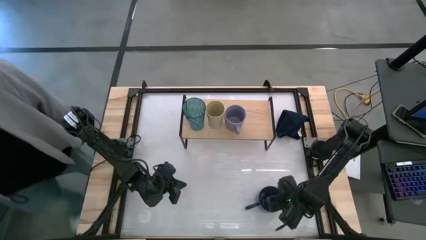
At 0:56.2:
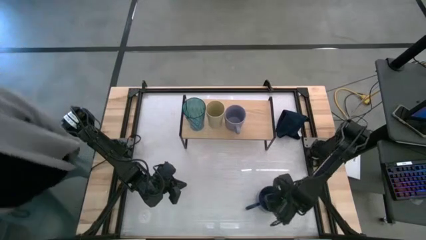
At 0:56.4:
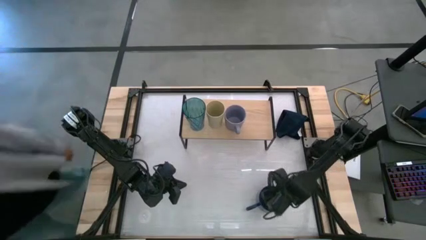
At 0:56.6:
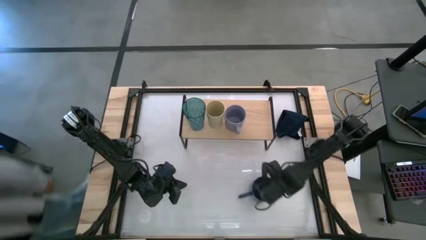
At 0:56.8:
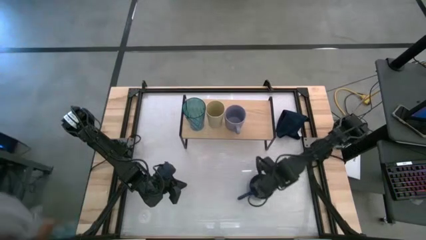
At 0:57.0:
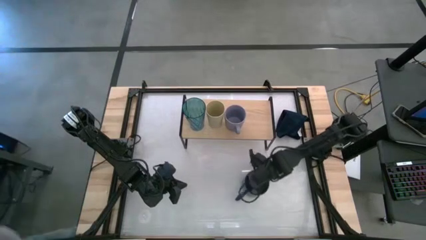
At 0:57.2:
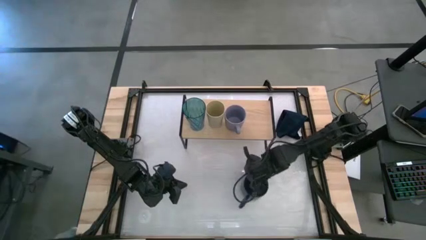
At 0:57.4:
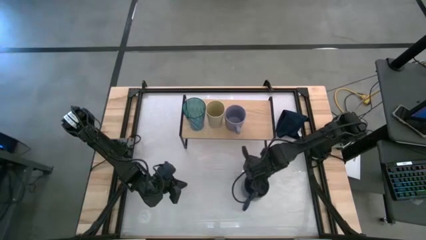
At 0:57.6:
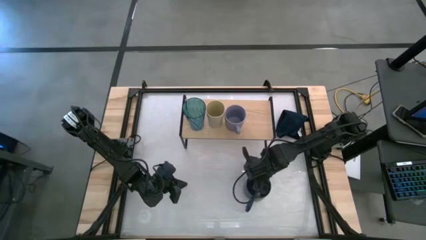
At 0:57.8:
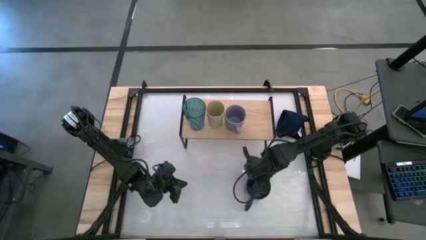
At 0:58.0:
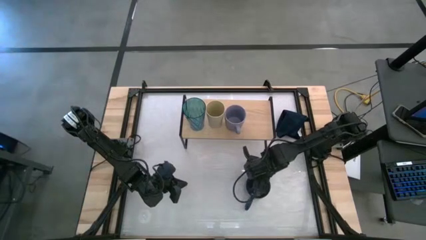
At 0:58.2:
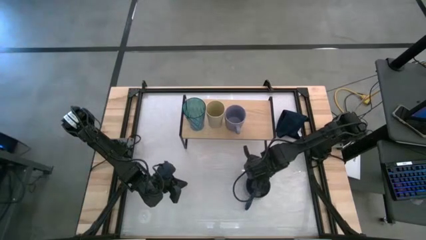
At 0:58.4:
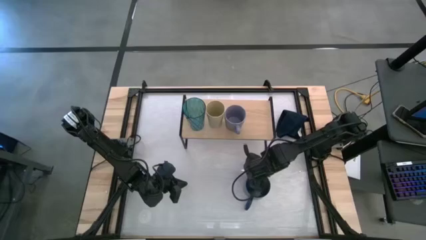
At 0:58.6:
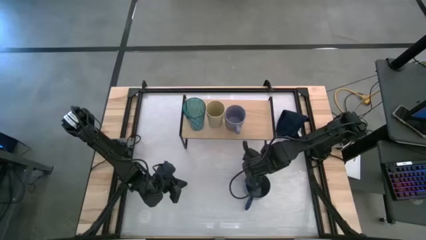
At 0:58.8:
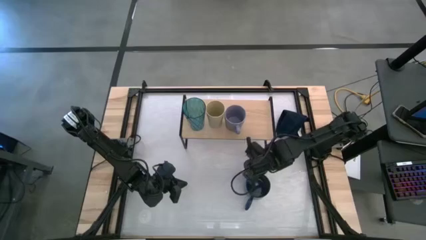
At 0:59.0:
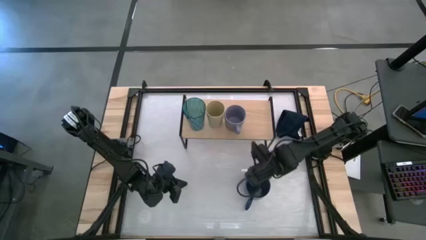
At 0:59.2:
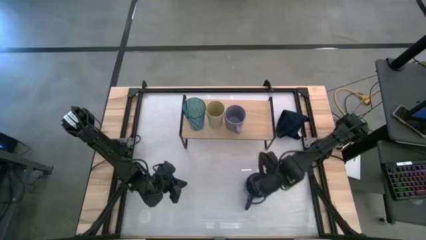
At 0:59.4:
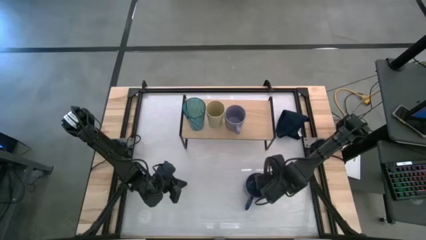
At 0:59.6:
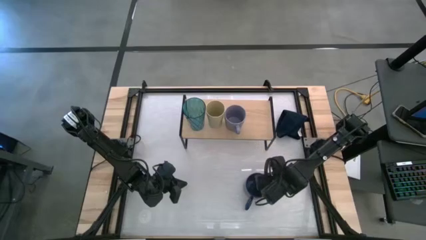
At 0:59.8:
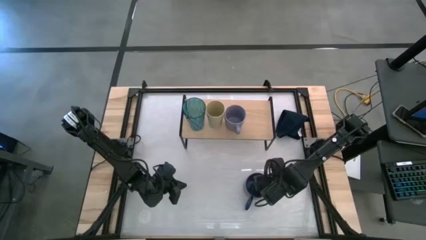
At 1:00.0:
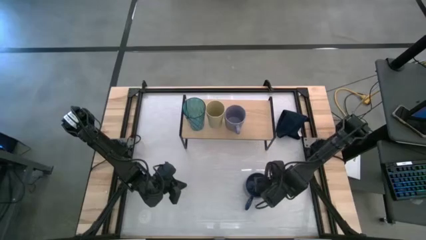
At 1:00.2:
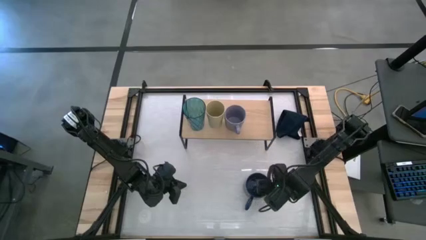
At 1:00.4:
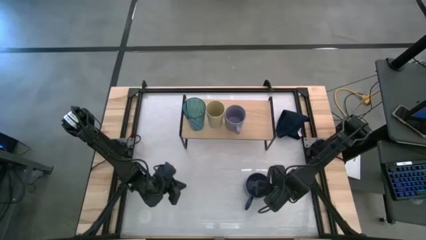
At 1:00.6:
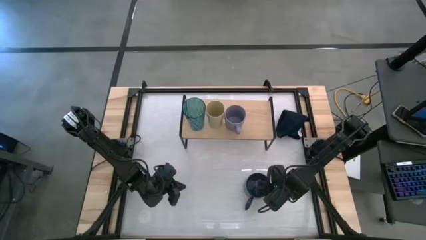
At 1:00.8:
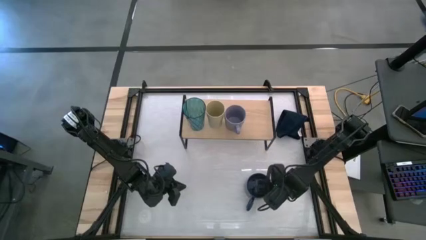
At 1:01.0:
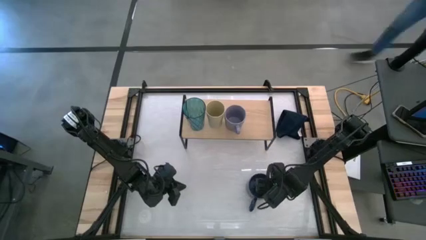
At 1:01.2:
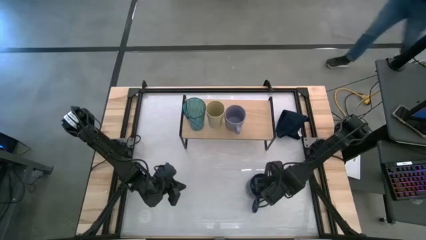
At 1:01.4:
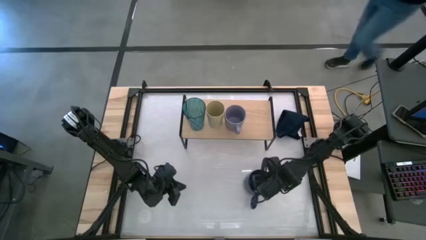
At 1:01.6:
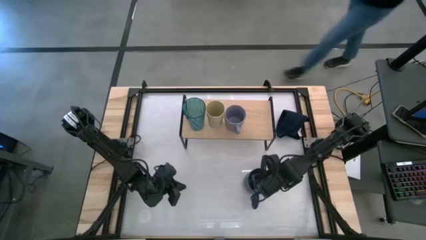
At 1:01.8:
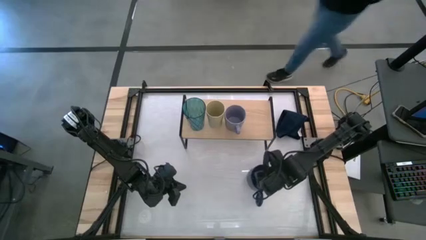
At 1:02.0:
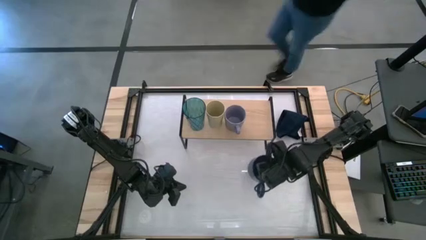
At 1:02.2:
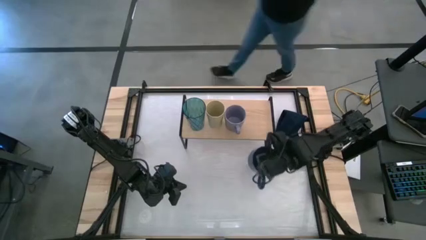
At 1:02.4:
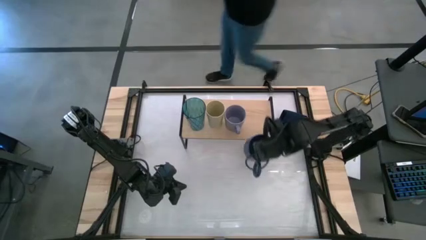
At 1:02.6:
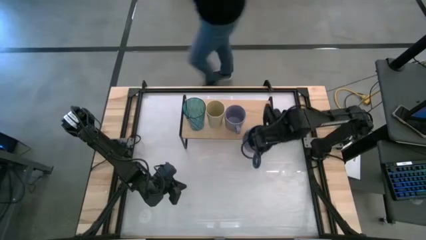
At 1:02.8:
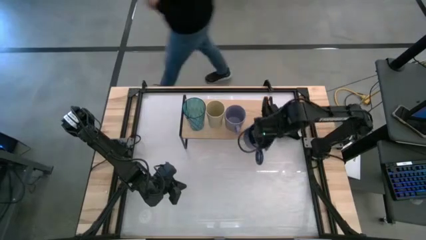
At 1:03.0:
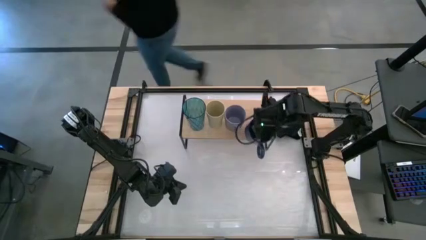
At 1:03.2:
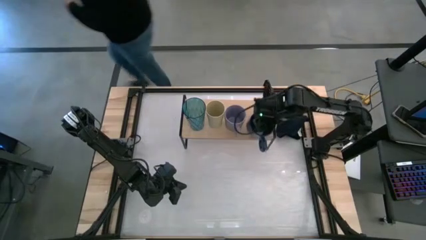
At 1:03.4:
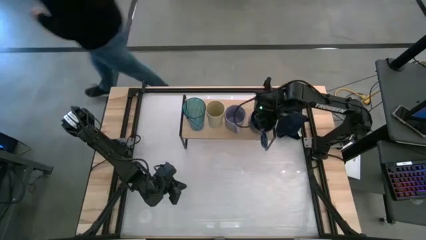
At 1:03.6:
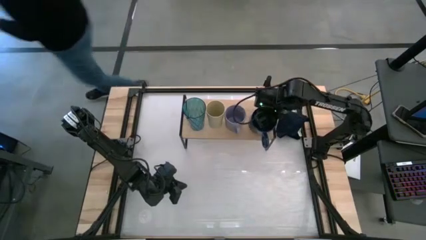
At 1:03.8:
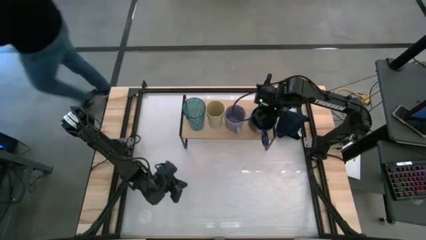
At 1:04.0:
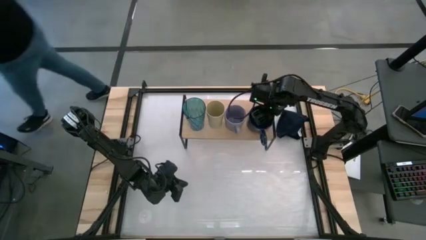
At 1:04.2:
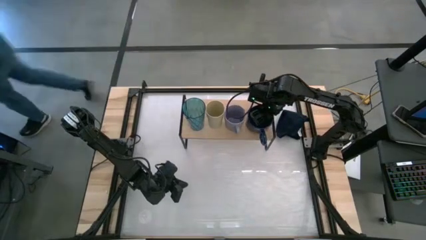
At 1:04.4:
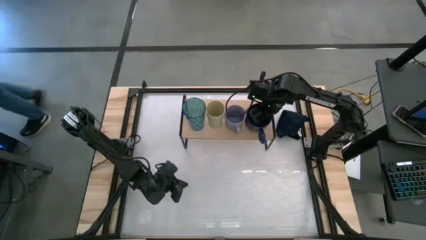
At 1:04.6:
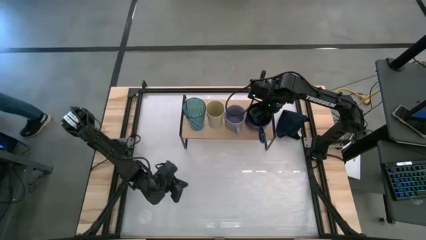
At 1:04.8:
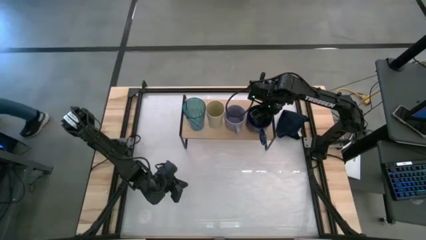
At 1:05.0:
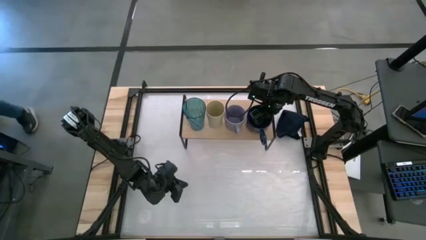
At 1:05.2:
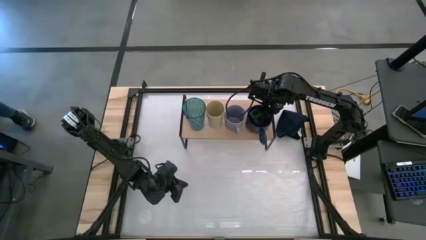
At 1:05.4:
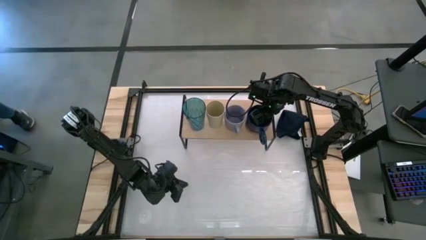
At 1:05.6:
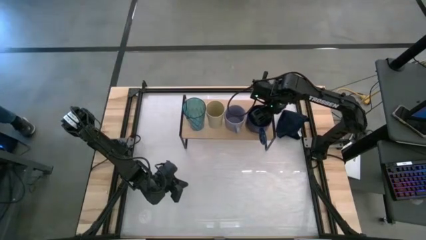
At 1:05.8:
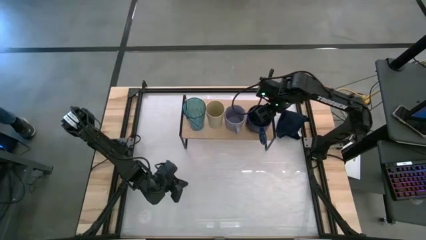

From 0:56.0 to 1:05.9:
Task: Stack small to large cups/mugs on shelf
Put the blue mug on the shelf

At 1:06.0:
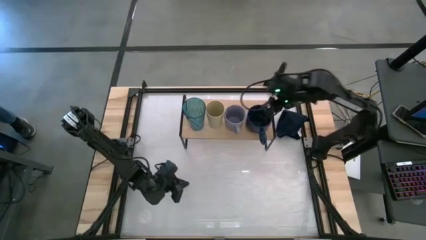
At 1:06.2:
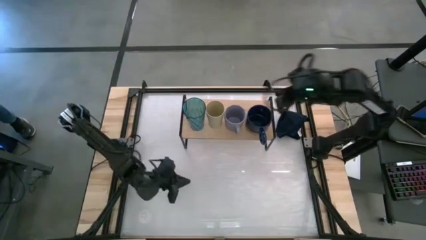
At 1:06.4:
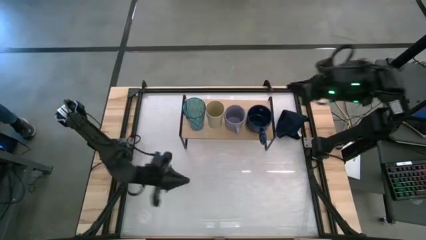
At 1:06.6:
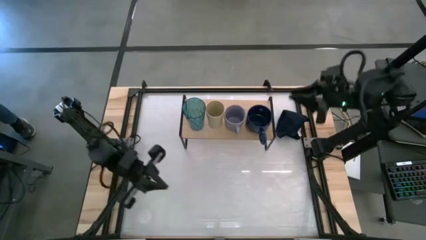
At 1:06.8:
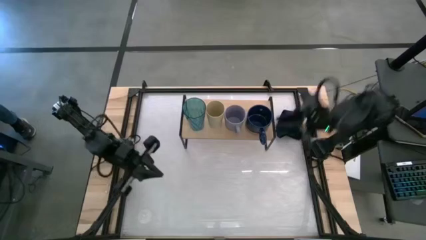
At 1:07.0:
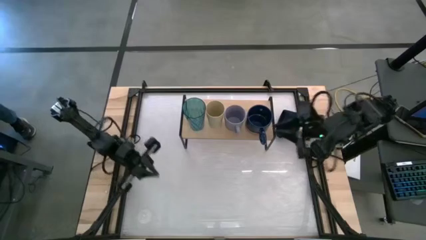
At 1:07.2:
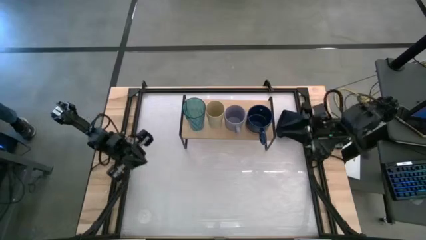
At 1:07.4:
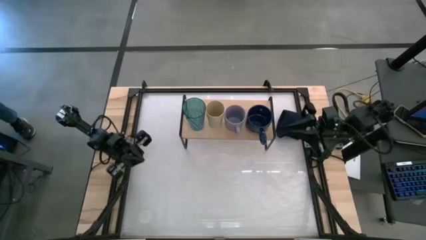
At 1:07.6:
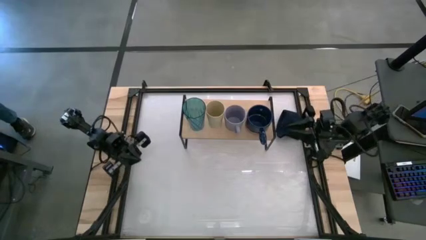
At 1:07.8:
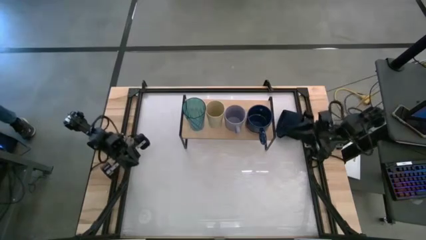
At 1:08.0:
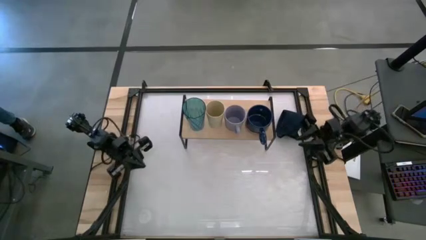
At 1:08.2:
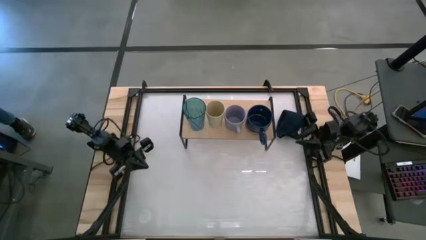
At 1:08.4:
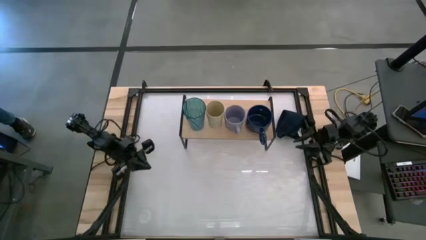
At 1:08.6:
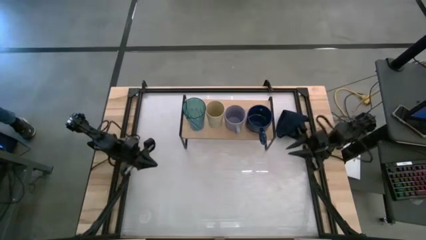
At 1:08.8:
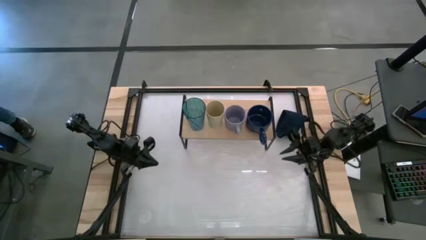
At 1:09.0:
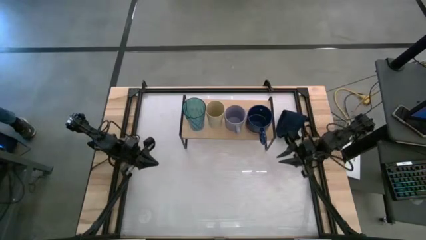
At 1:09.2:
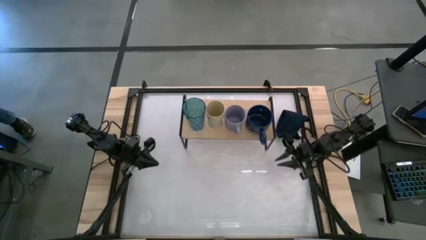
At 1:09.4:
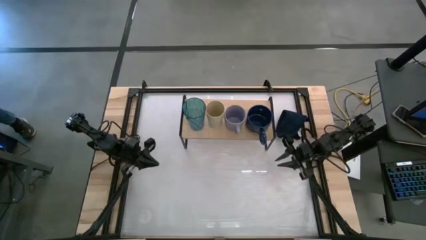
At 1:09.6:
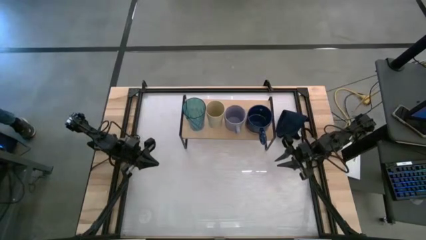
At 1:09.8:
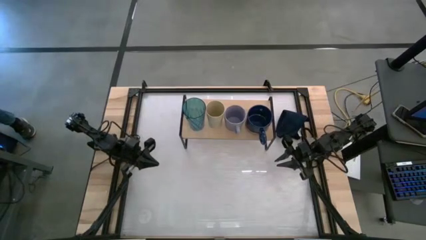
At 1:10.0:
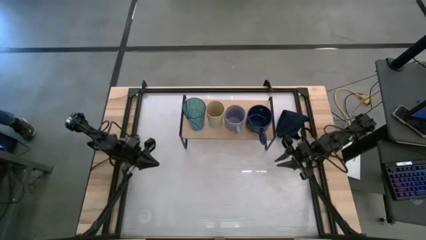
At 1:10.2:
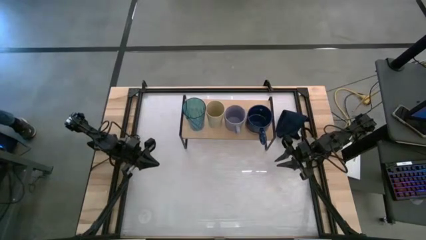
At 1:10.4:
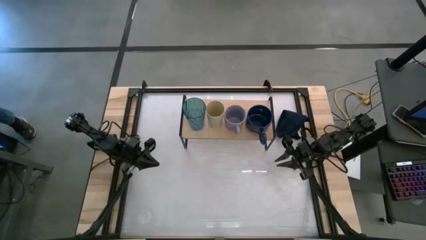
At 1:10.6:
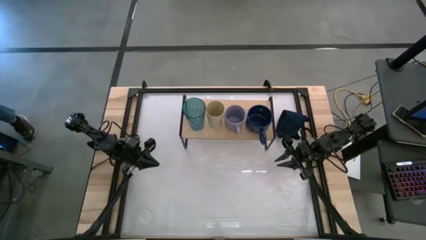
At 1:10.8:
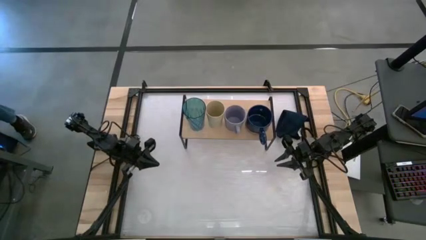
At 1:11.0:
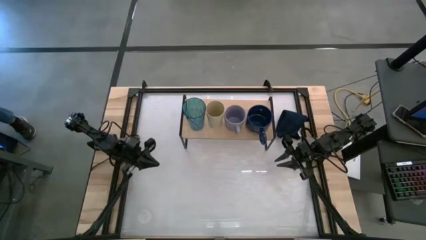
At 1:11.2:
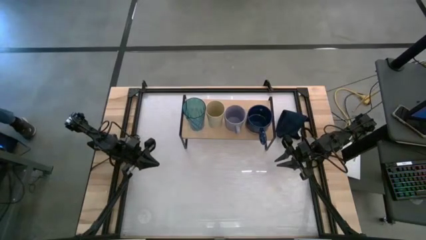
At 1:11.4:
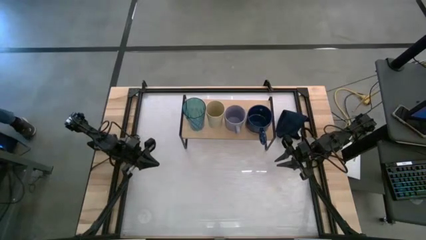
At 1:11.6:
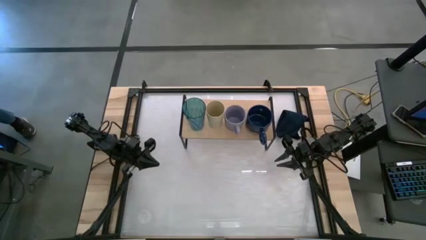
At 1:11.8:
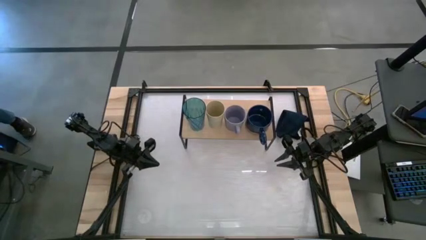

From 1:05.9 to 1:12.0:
Return to Home Position
